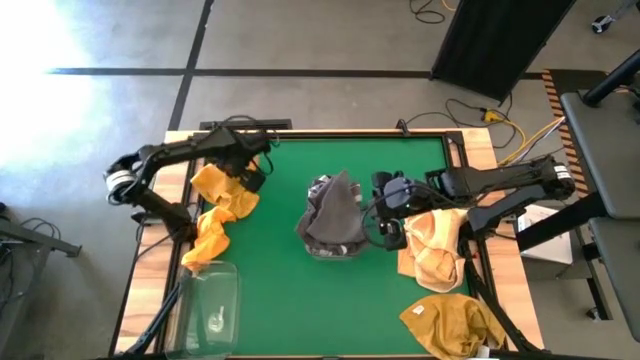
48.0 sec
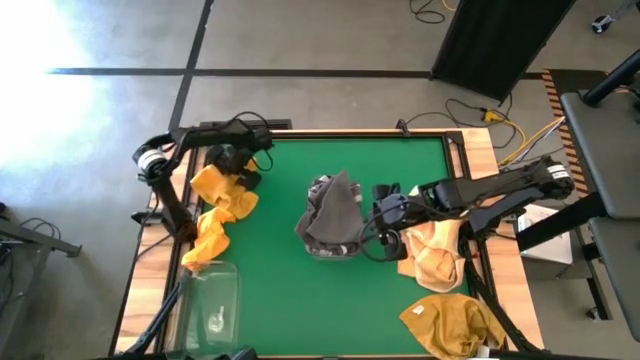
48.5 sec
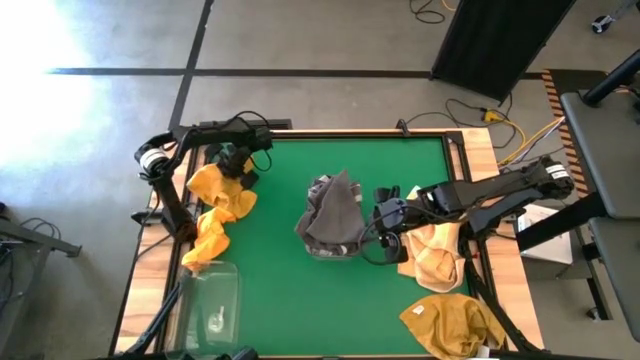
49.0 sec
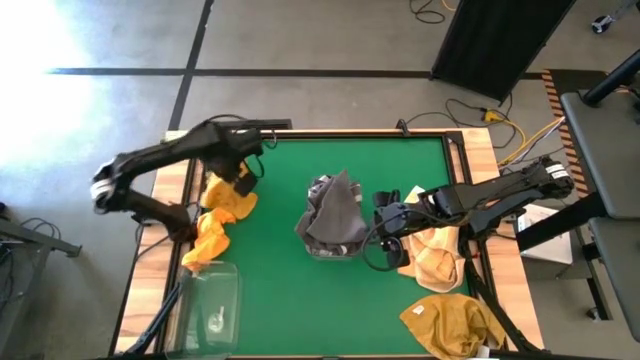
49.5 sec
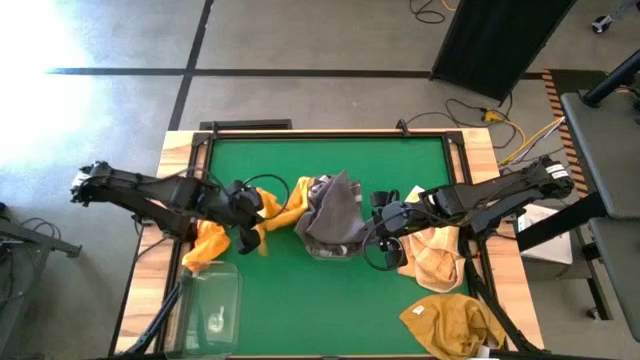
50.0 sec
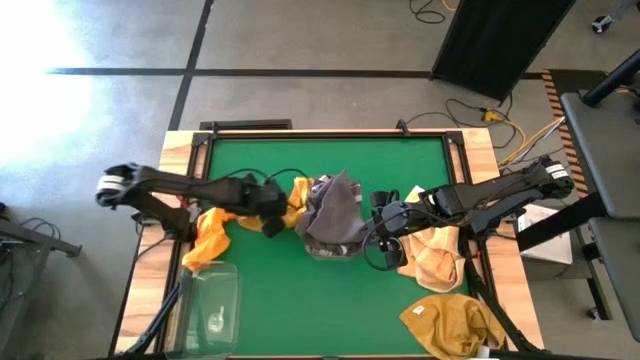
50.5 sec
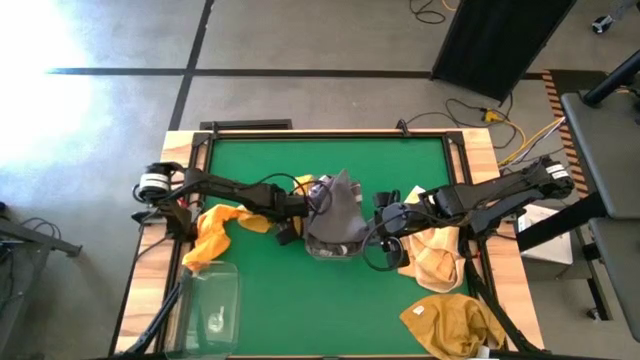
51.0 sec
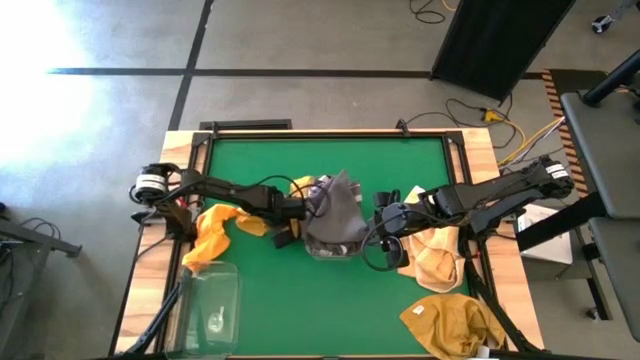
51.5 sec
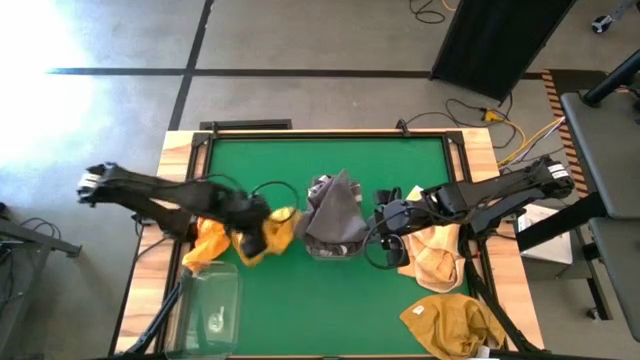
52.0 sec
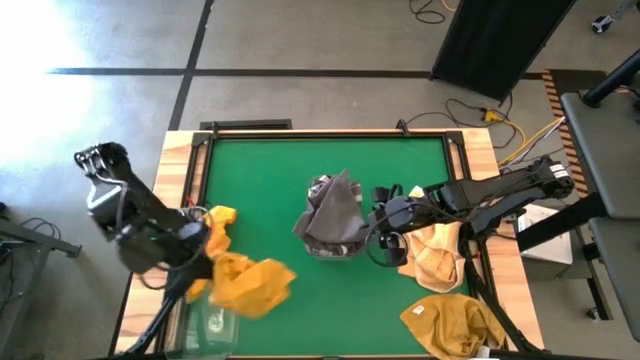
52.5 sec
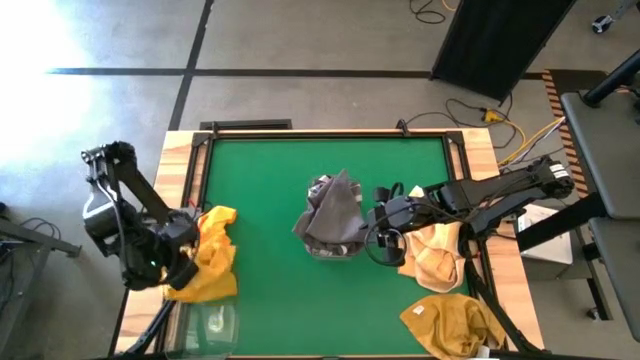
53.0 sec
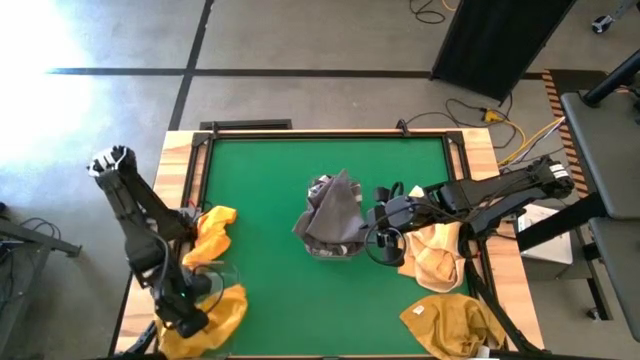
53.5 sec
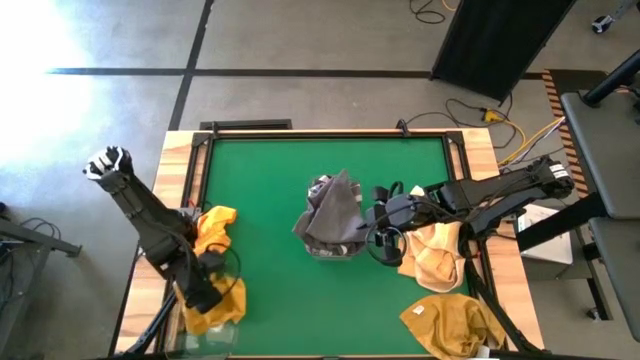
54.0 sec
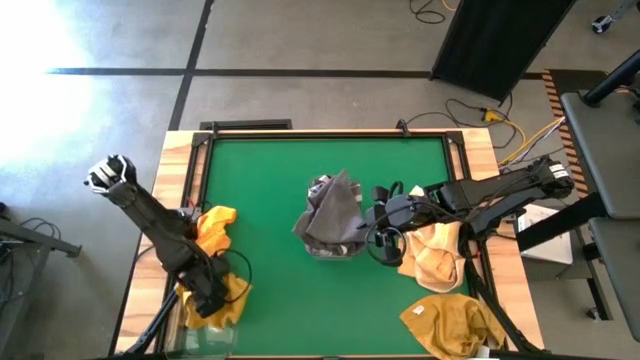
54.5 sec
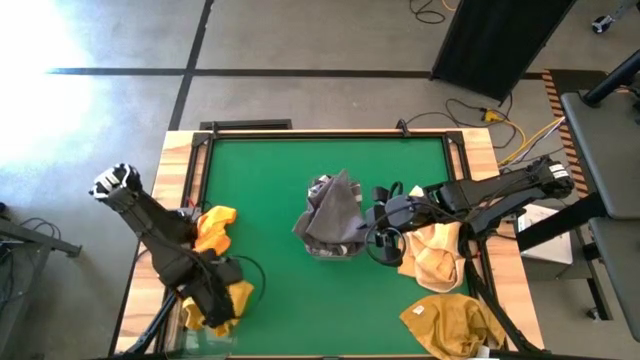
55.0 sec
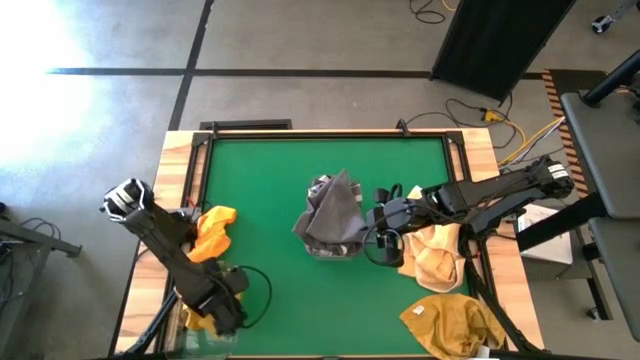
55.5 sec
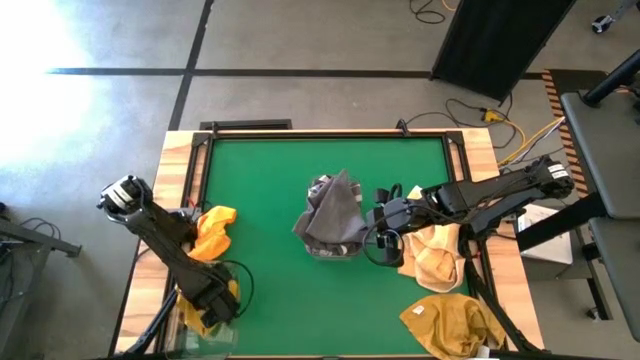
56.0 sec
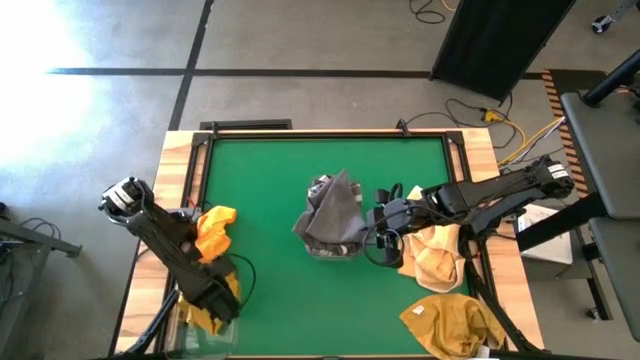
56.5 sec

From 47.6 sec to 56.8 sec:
Task: Sort towels by color in basket
Put the top yellow towel into the bottom transparent bin

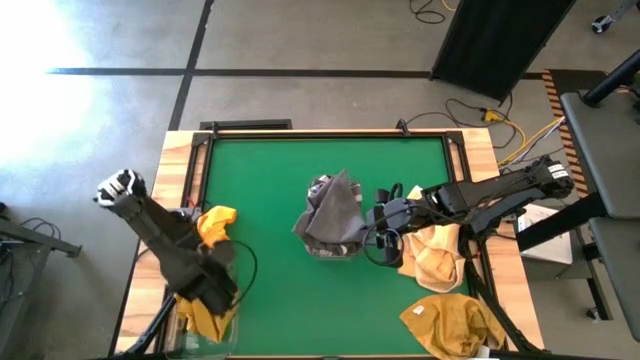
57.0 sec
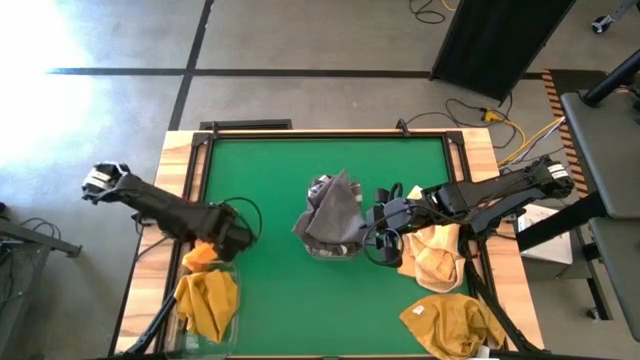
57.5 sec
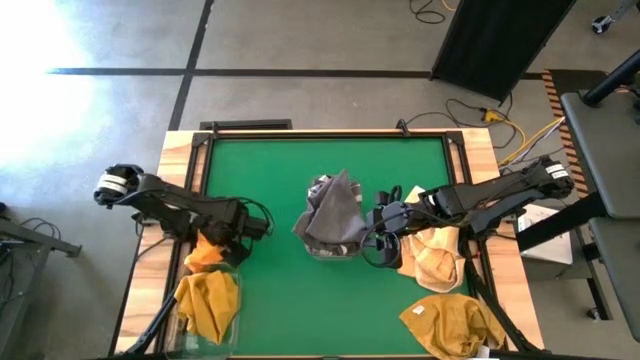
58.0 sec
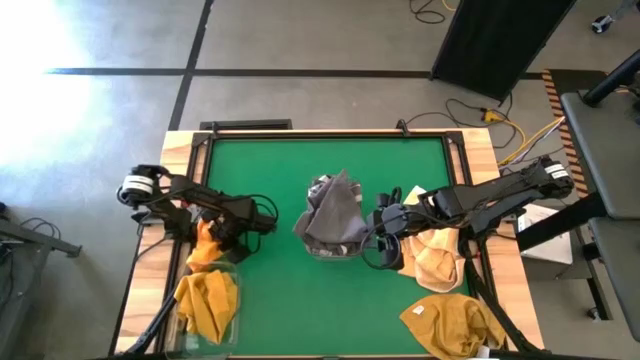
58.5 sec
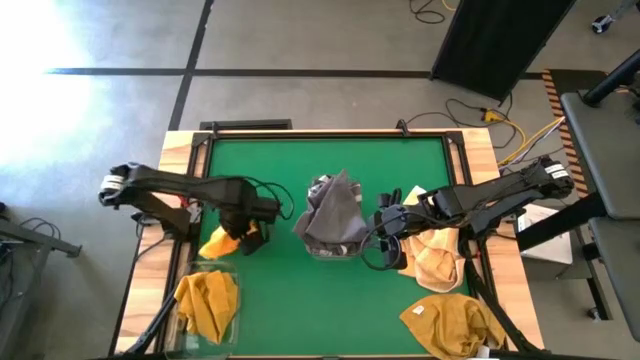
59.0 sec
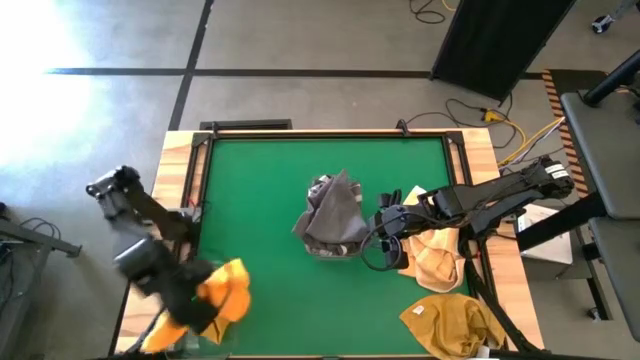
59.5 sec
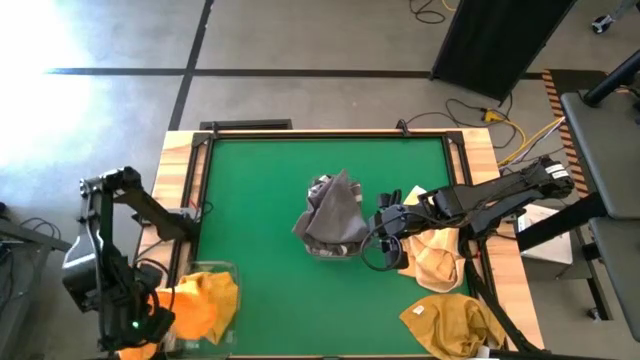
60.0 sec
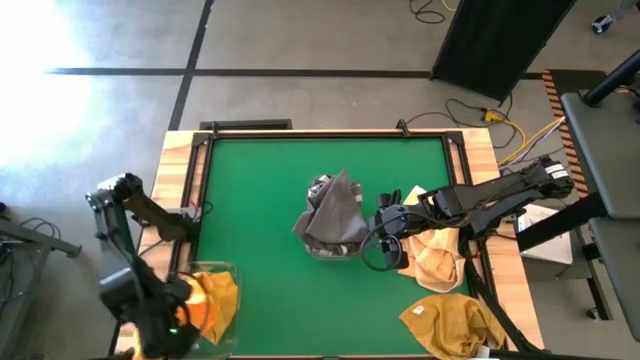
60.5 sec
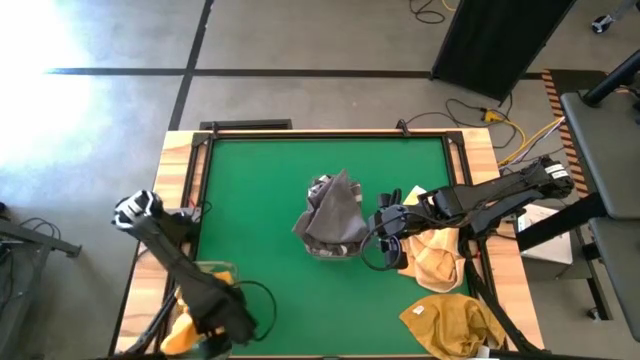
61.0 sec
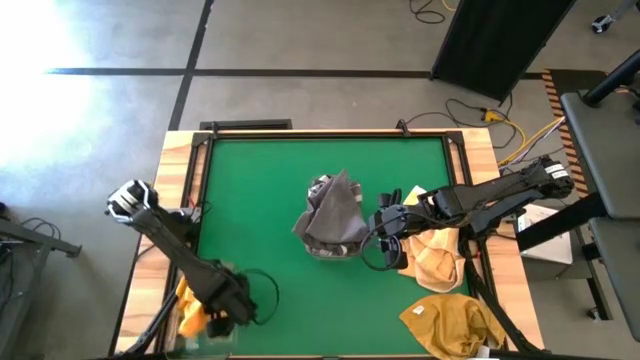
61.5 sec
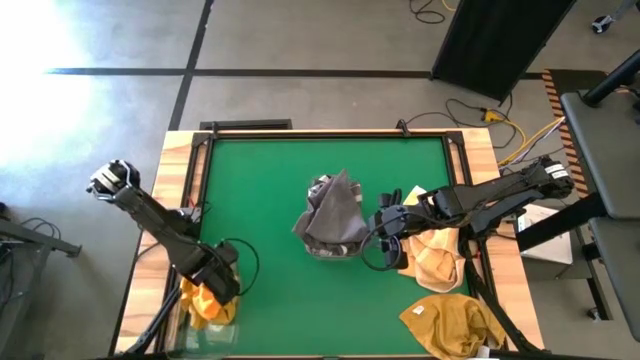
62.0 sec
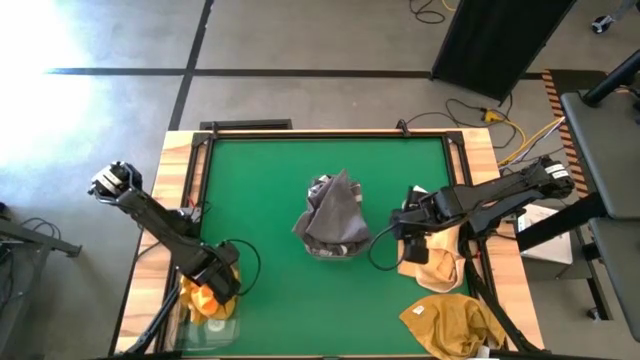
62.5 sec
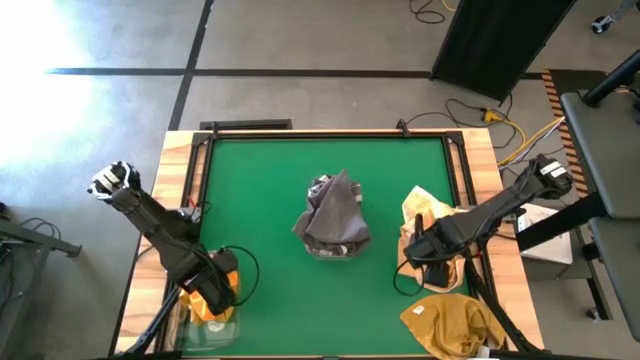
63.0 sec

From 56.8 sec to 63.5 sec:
Put the top yellow towel into the bottom transparent bin

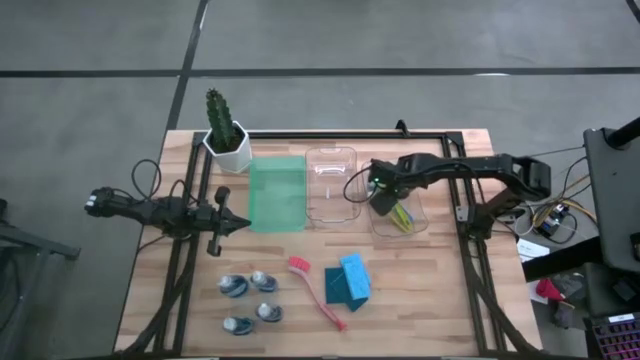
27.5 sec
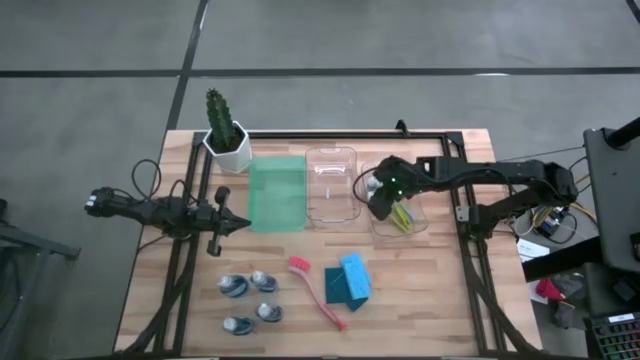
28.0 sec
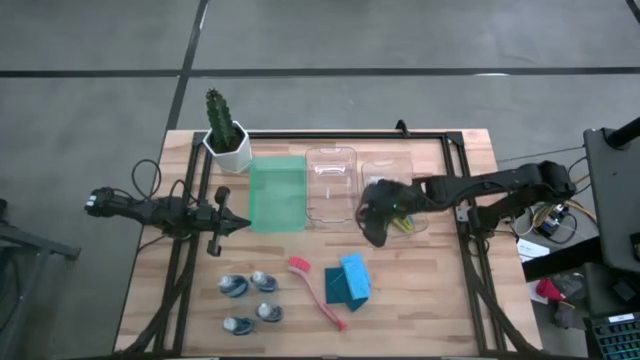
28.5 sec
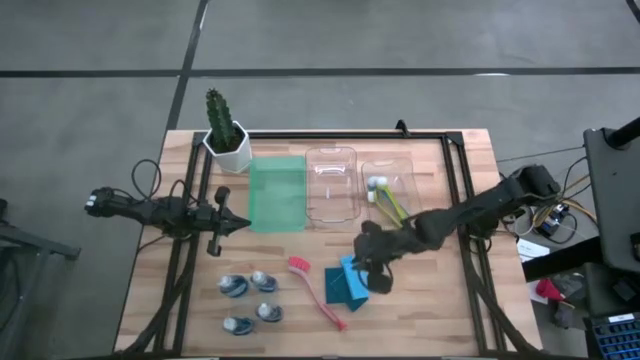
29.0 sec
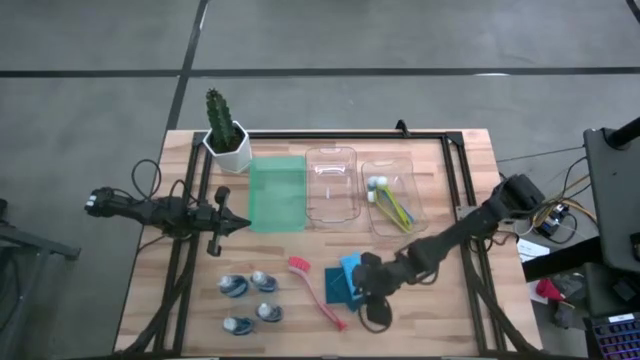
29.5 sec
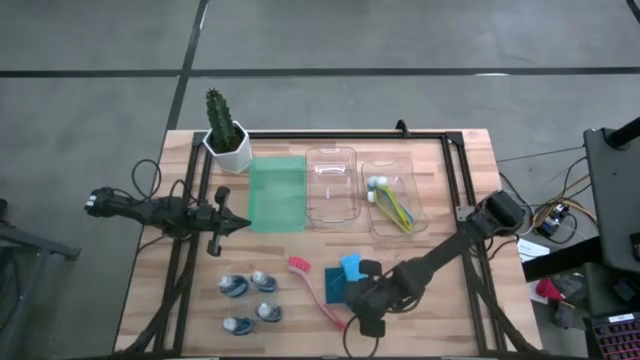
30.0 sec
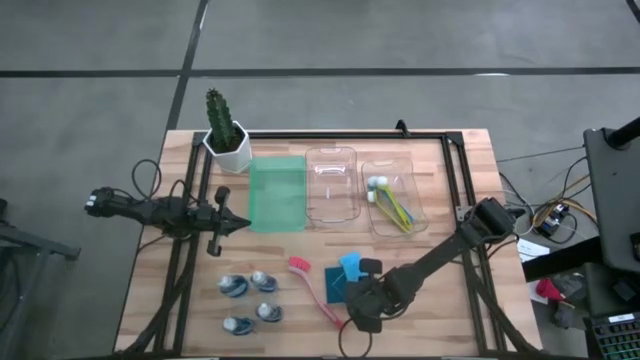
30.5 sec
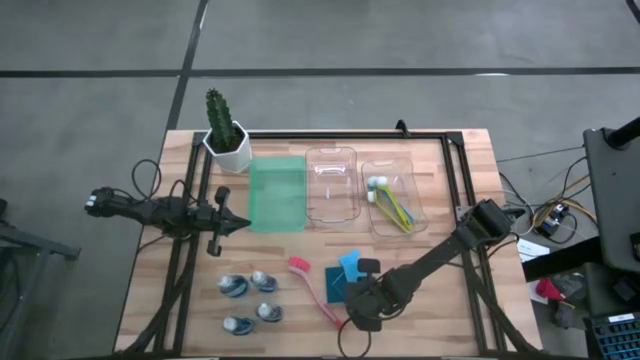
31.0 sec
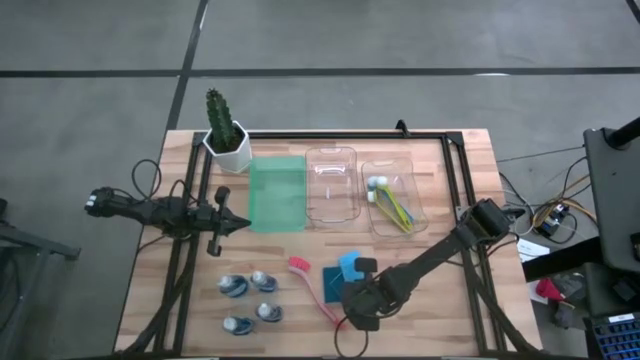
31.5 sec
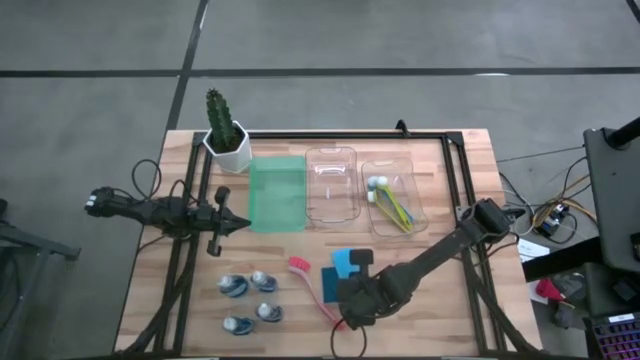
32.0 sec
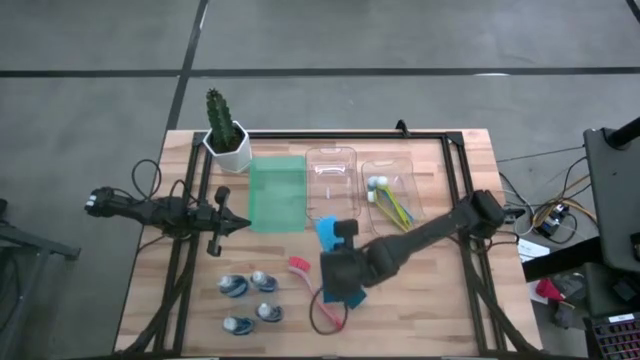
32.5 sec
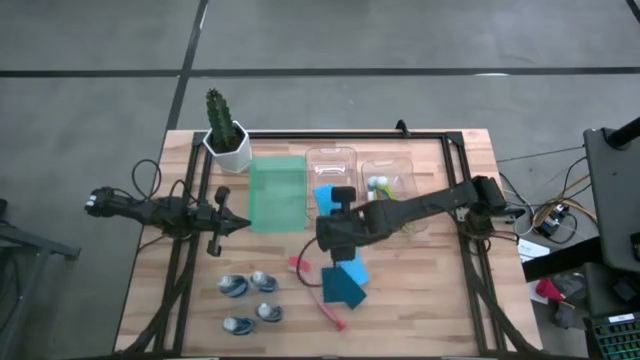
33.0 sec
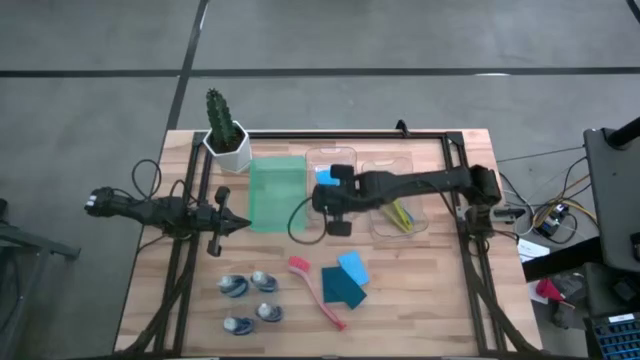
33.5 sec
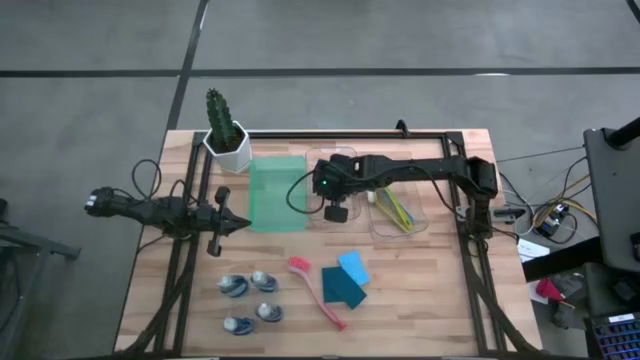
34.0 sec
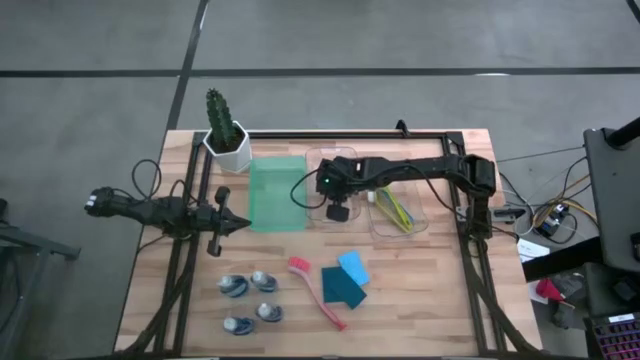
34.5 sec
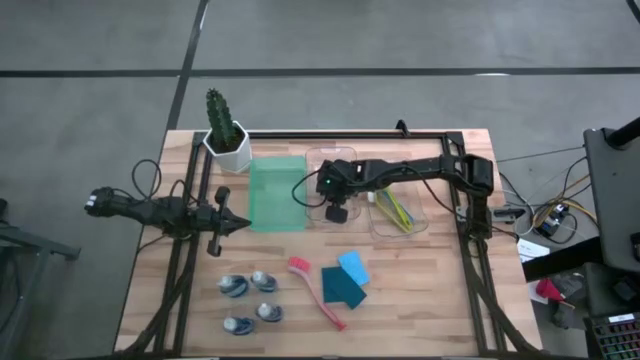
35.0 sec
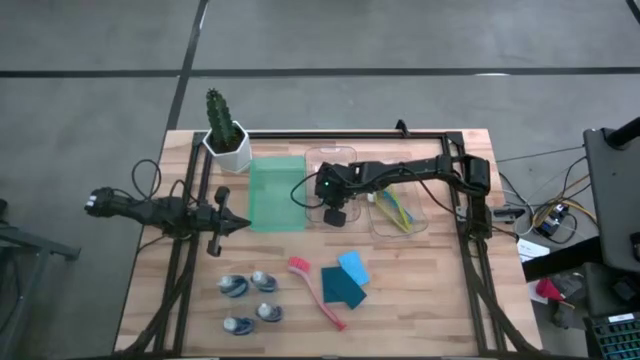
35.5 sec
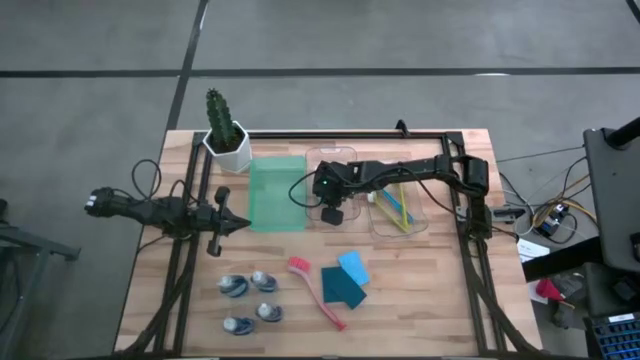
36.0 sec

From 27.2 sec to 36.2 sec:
Task: Pick & Place Kitchen Sink Supplies
Put the blue sponge into the left transparent bin
